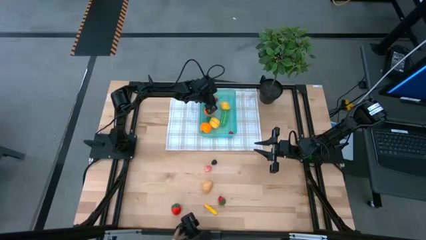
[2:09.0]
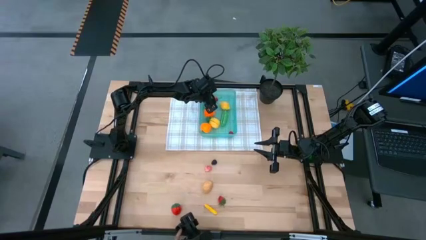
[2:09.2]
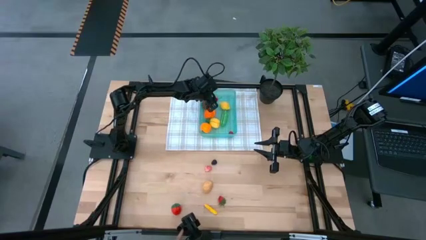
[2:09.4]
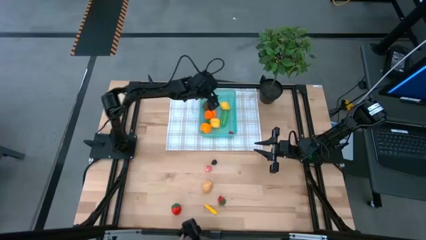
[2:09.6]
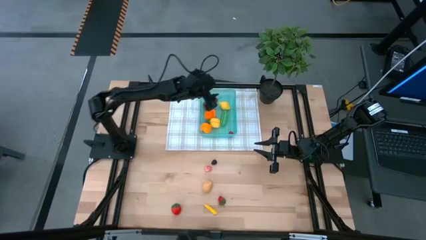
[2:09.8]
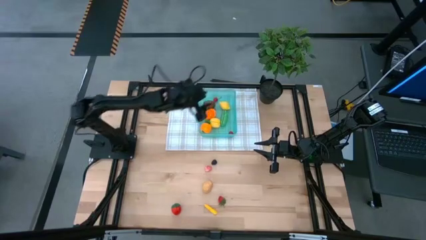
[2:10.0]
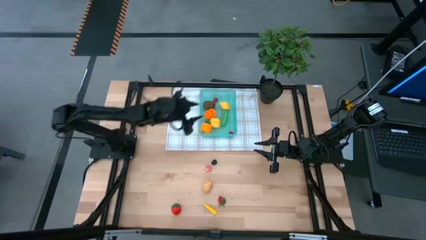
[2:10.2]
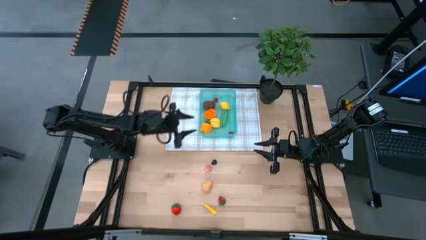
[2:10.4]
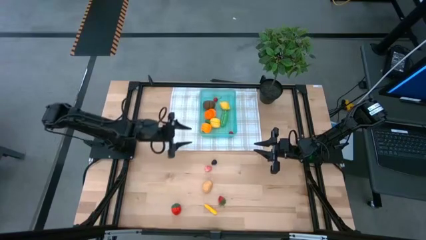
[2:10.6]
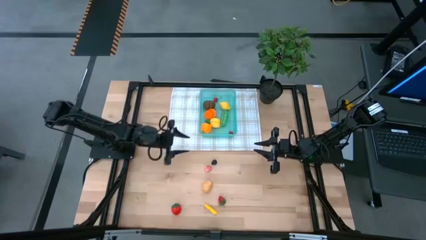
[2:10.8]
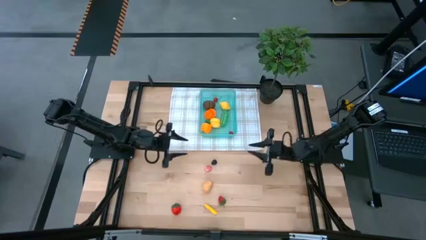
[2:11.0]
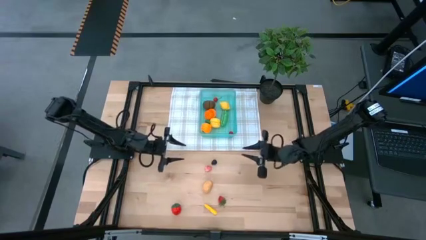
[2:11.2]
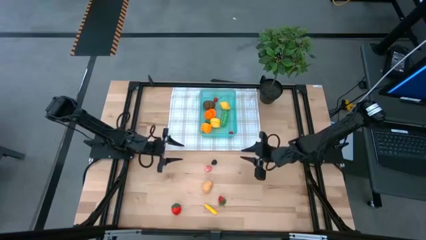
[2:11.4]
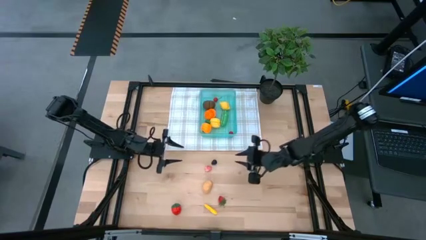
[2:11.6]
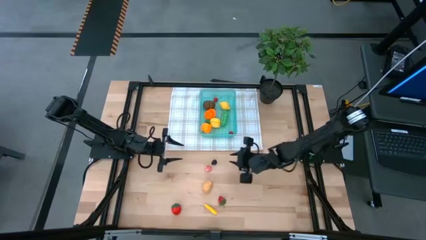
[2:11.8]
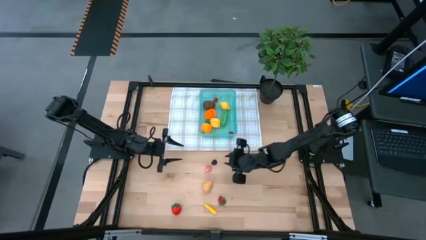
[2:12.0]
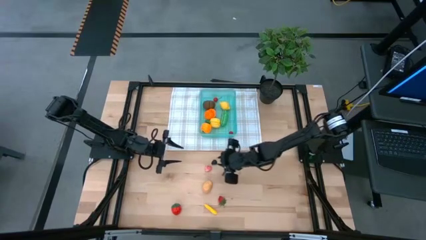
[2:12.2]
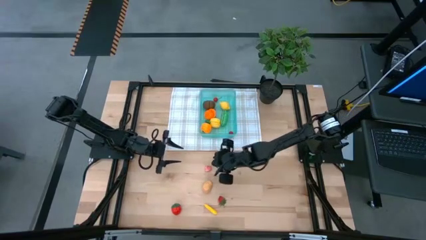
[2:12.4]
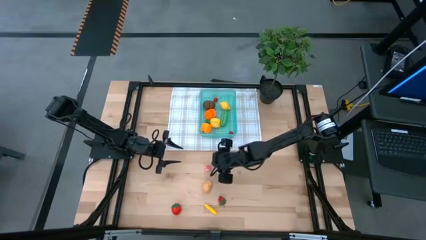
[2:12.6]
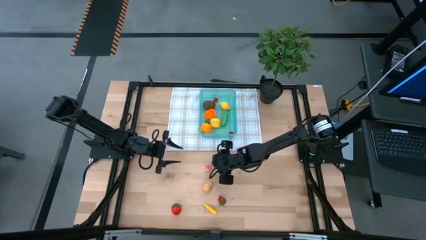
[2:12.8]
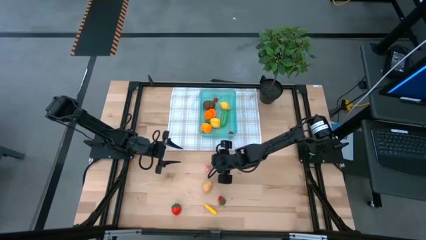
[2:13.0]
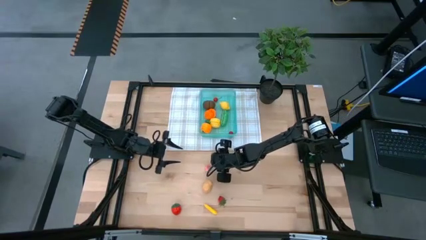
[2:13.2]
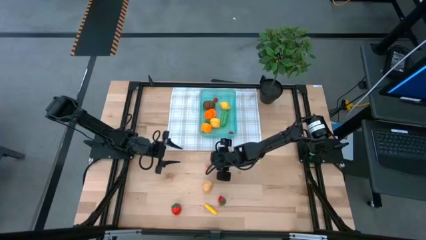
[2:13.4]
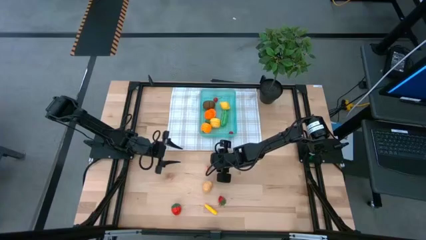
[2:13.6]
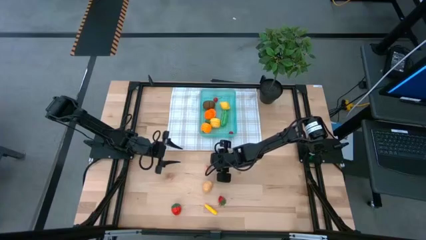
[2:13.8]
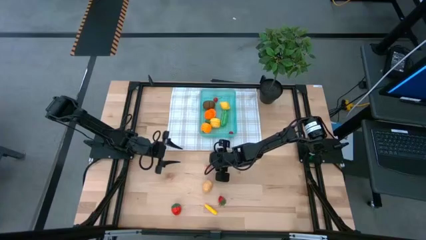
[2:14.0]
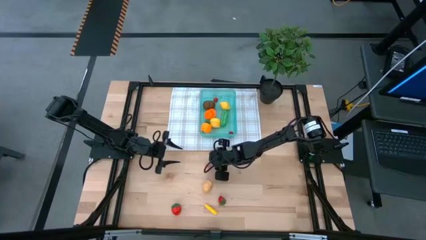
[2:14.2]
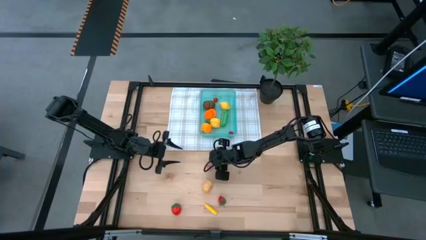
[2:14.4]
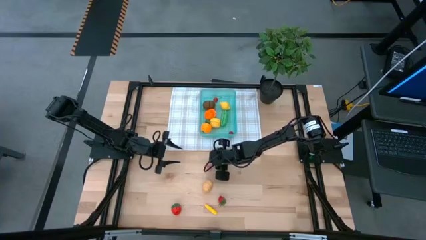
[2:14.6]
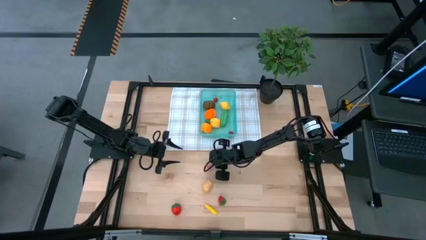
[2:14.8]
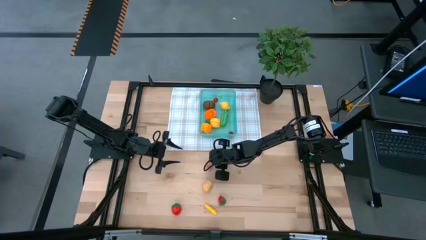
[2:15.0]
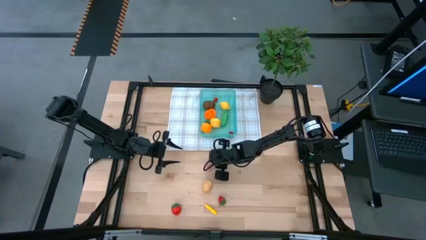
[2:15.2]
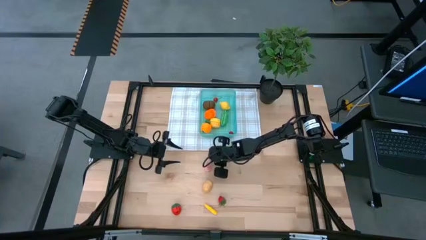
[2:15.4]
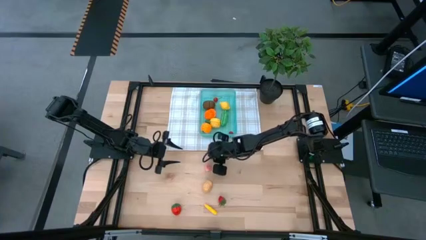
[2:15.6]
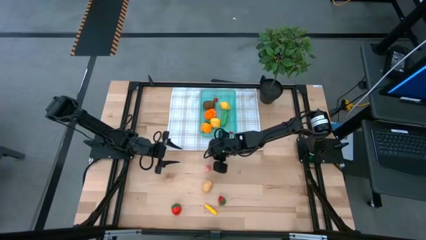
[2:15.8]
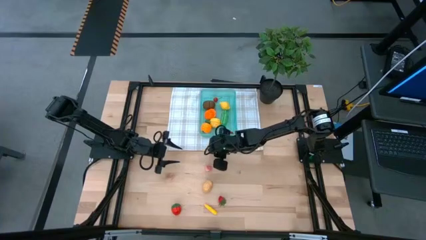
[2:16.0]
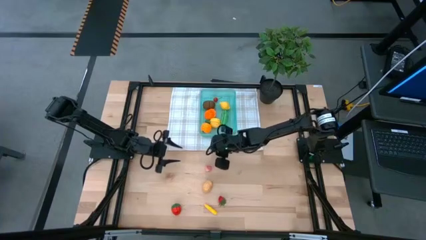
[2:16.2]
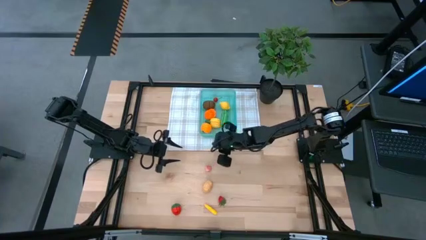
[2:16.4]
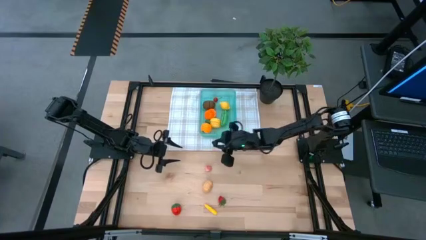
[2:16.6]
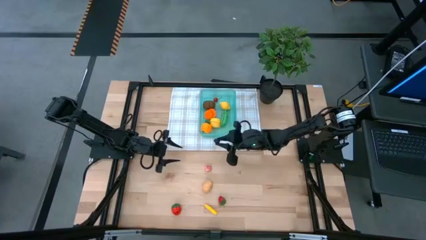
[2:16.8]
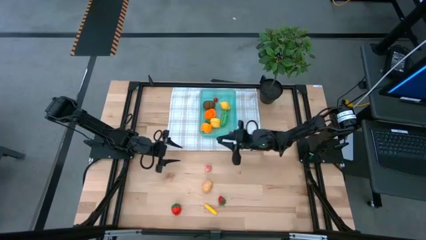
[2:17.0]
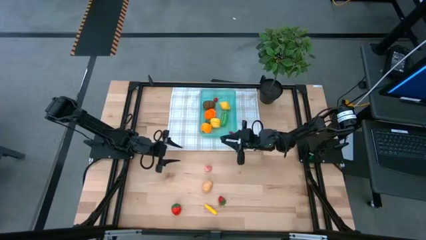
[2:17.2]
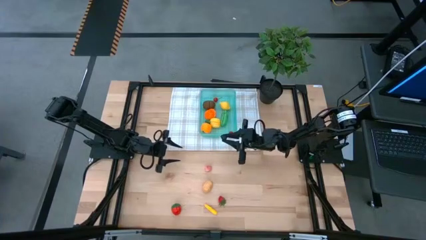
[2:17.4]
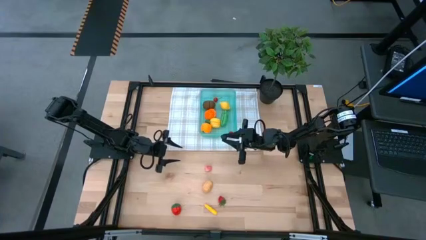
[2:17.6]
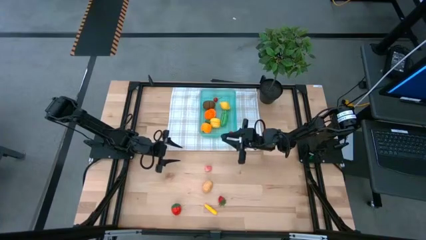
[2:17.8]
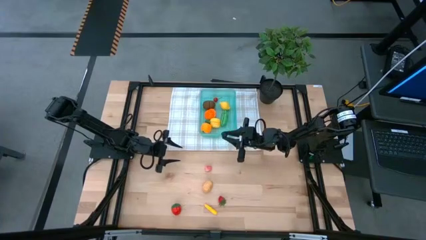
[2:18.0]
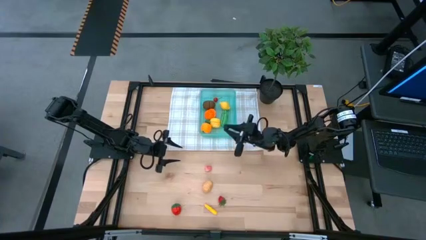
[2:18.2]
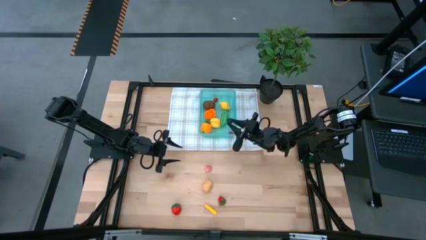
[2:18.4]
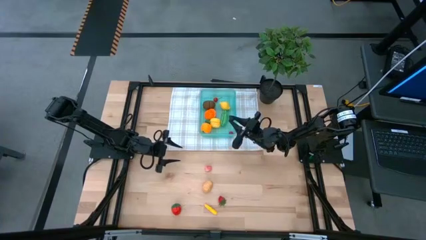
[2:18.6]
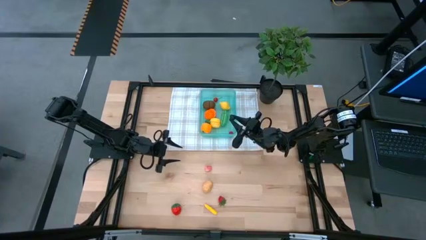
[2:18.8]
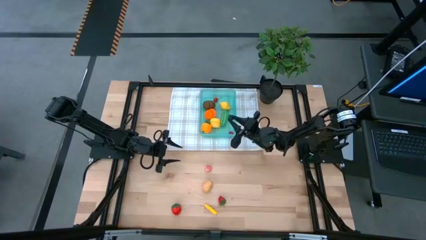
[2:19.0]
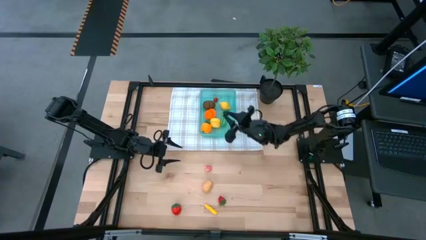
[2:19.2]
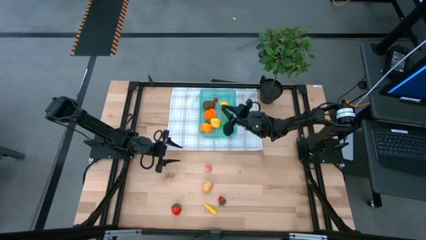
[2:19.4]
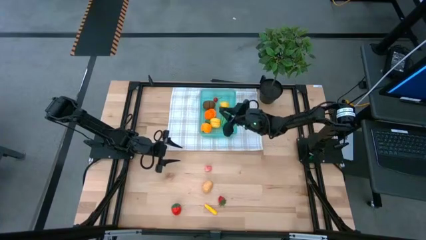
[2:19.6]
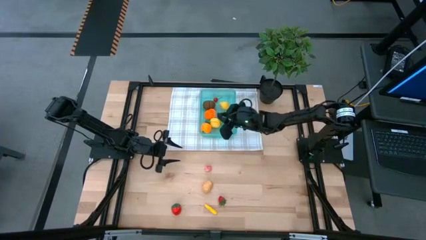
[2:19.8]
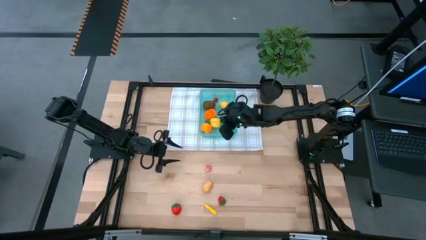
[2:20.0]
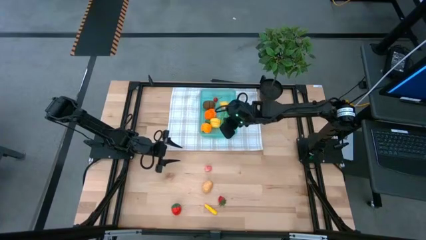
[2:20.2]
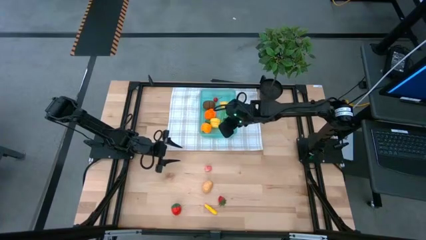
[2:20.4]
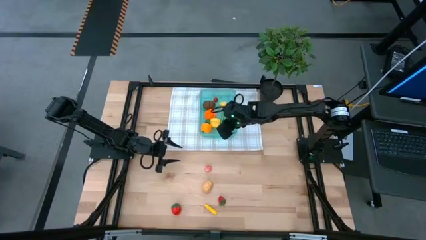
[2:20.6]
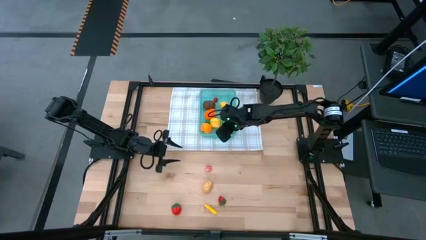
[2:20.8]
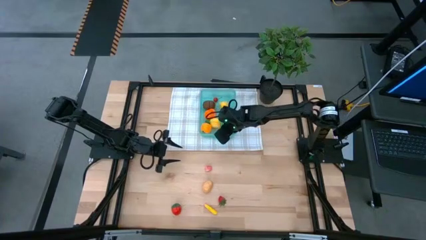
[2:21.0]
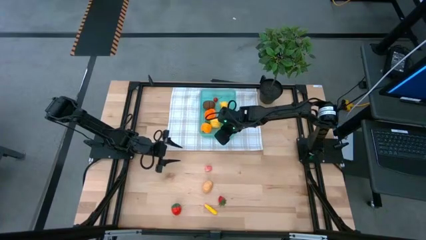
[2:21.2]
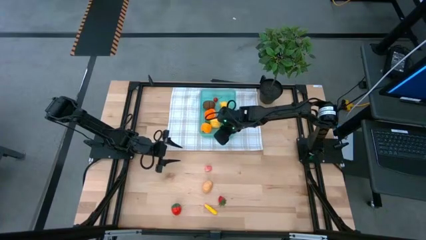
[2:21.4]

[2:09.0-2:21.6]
Task: Pick and placing Produce into tupperware
Put the blackberry into the green bin

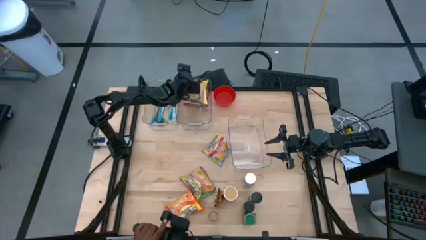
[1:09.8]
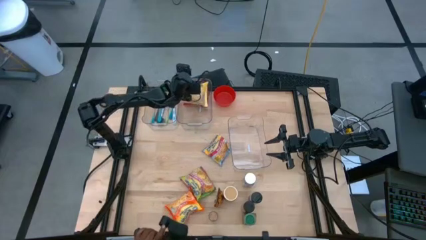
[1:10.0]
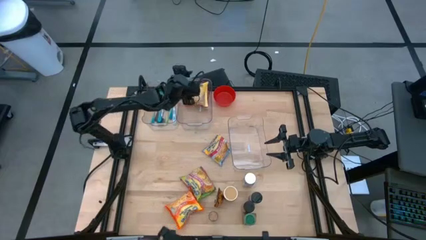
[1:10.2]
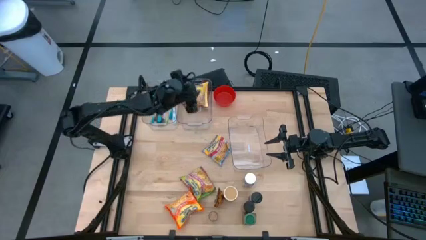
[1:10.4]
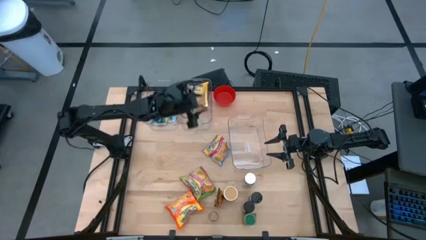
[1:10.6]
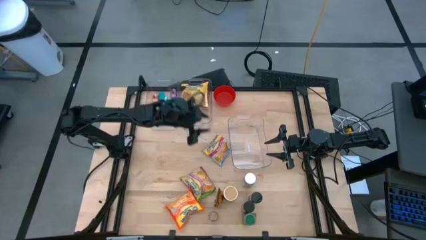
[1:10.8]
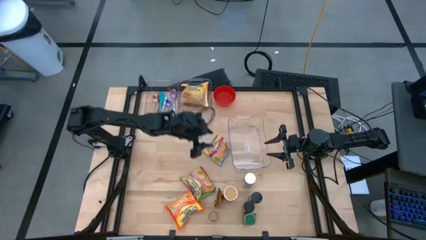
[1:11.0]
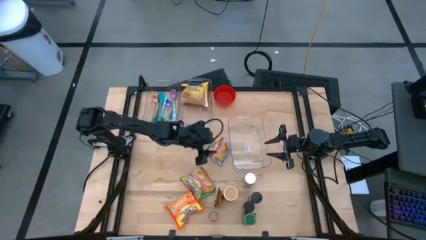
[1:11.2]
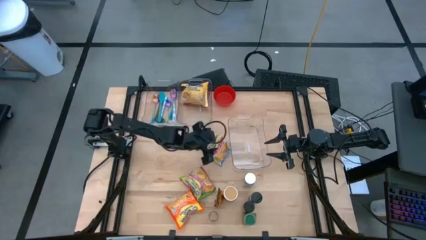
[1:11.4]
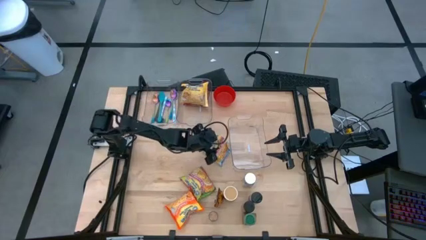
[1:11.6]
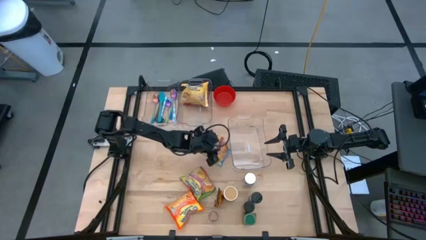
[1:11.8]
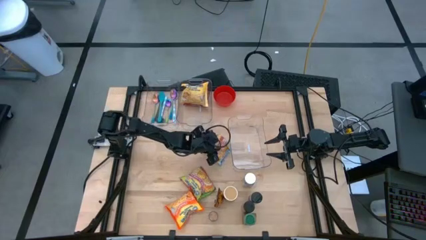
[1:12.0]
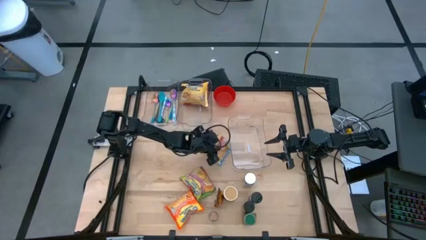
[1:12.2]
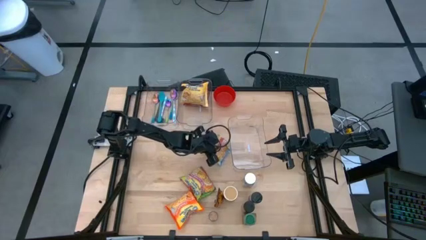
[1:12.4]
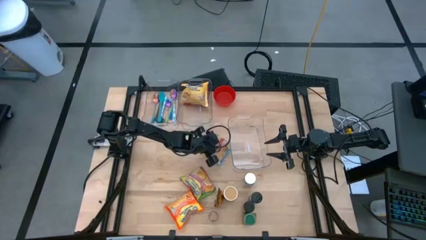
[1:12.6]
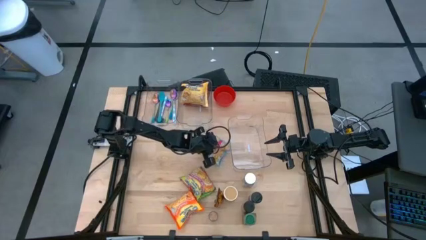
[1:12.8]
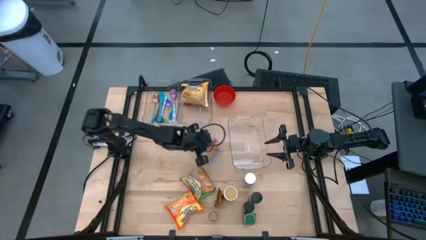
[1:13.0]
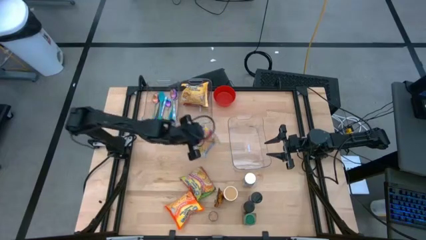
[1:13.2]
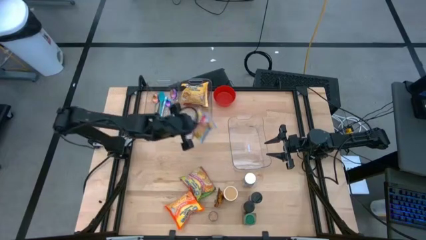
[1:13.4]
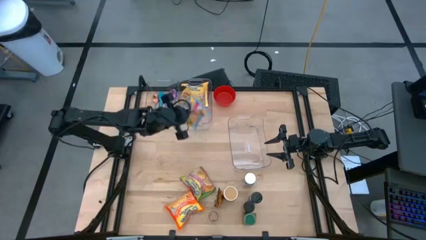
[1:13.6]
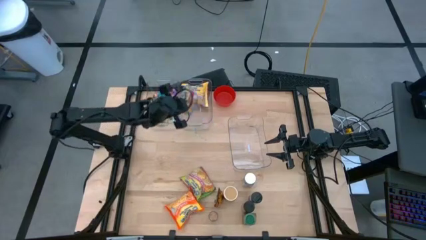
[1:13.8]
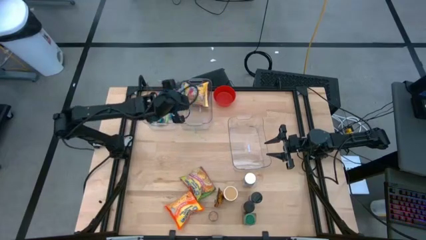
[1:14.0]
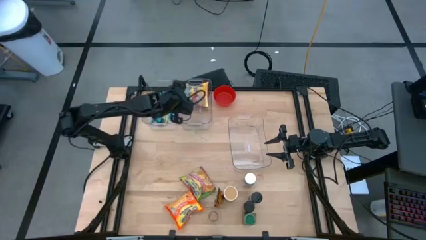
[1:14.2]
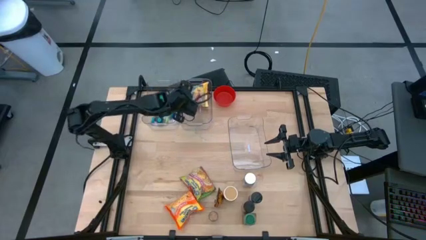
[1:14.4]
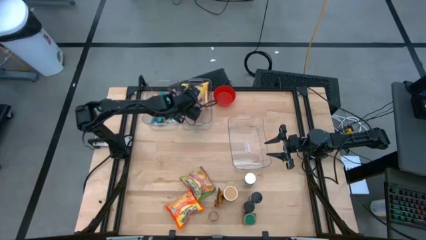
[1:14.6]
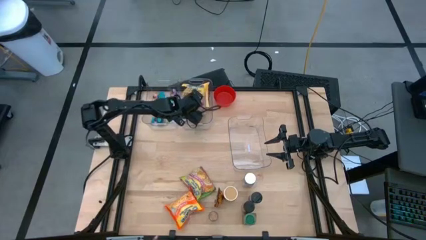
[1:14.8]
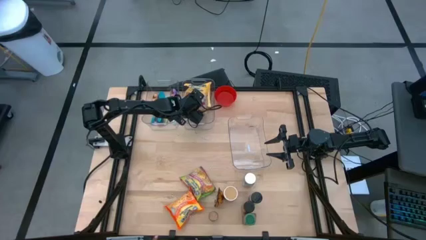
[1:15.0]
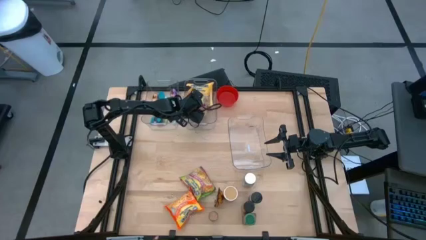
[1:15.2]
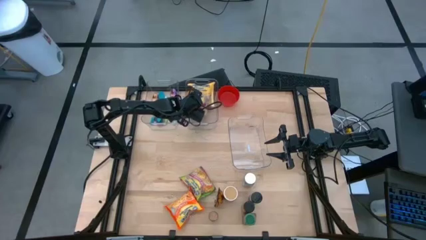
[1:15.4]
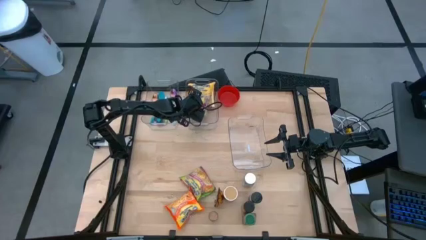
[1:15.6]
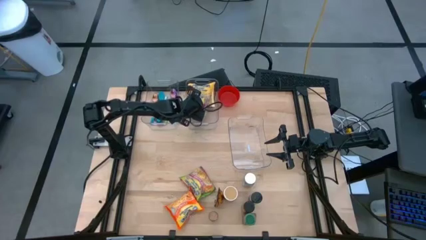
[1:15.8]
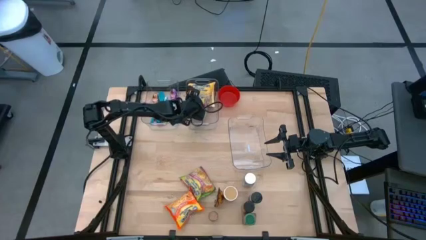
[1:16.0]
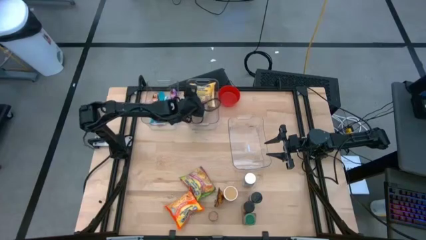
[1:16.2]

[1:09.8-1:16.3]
Task: Pick & Place Food Item
Put the blue noodle pack into the top right transparent bin
